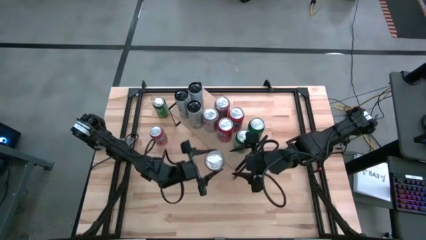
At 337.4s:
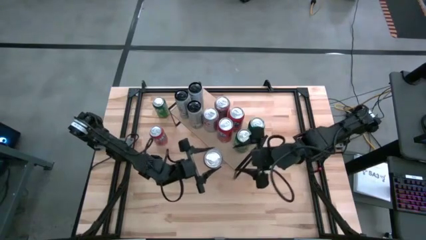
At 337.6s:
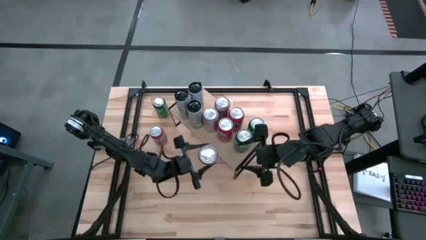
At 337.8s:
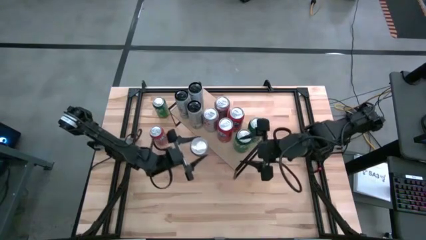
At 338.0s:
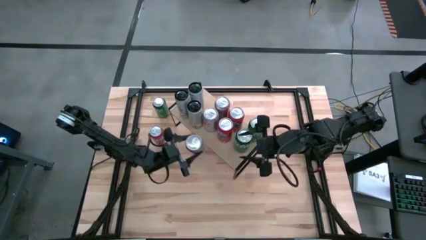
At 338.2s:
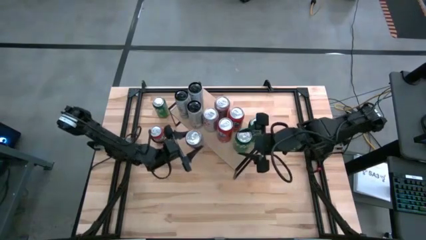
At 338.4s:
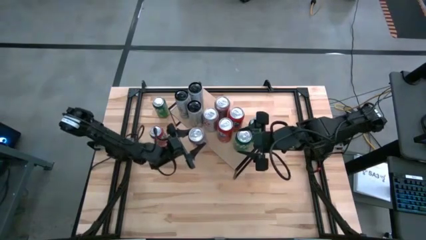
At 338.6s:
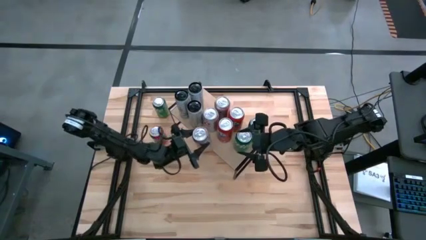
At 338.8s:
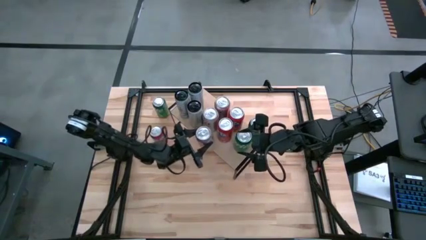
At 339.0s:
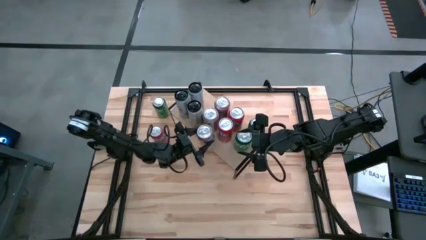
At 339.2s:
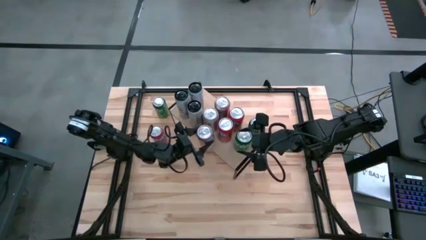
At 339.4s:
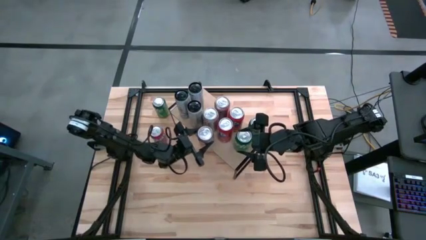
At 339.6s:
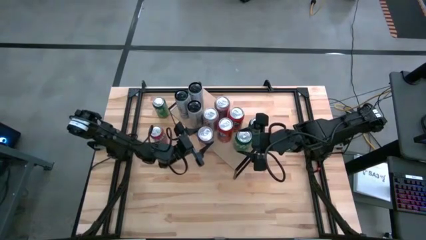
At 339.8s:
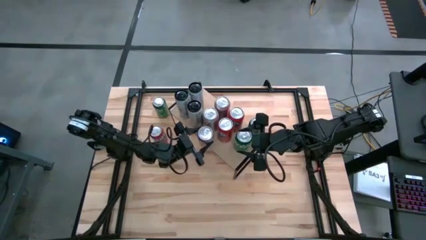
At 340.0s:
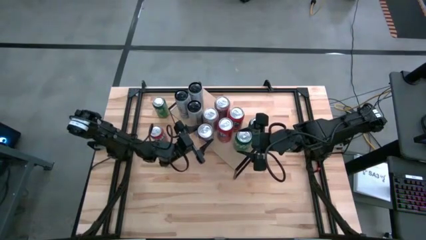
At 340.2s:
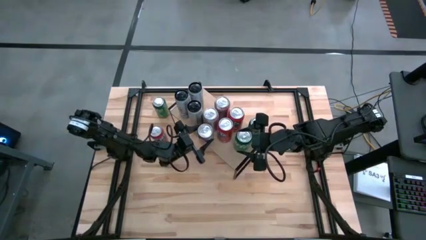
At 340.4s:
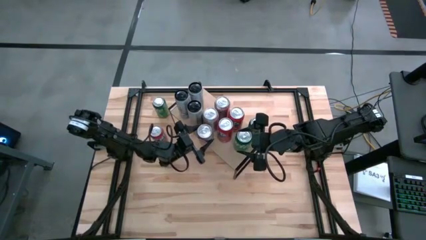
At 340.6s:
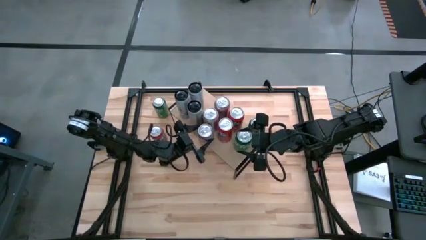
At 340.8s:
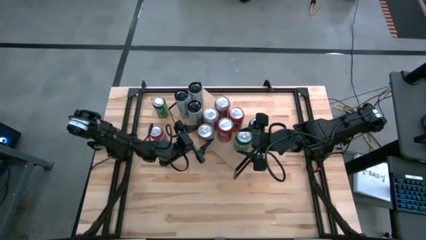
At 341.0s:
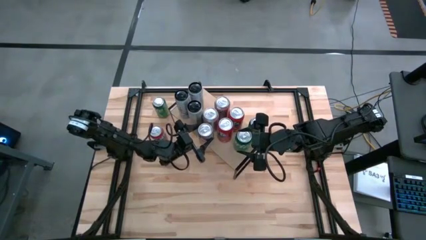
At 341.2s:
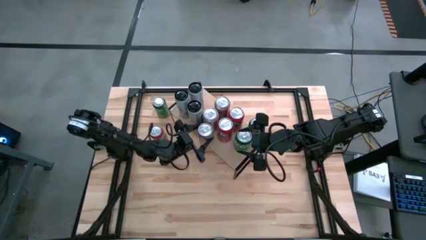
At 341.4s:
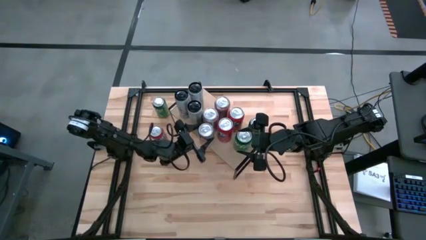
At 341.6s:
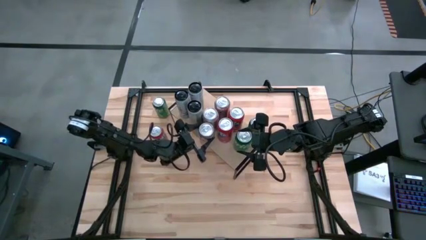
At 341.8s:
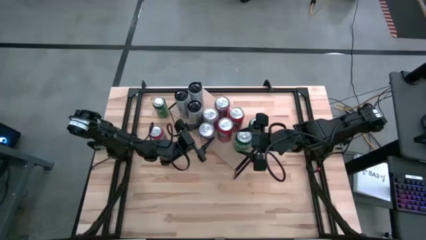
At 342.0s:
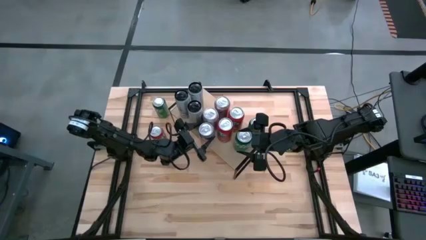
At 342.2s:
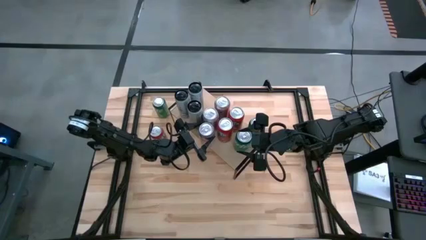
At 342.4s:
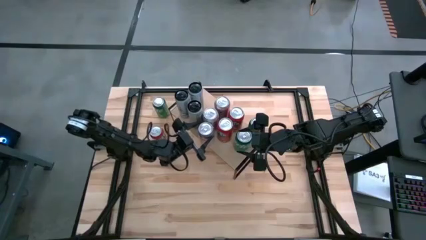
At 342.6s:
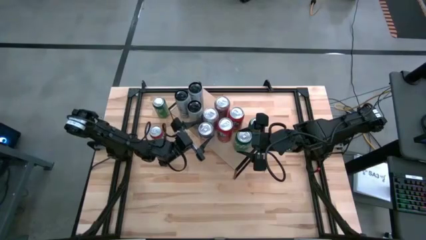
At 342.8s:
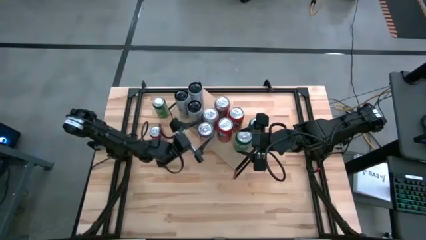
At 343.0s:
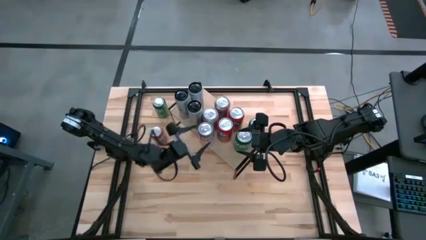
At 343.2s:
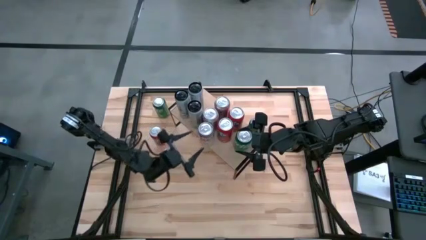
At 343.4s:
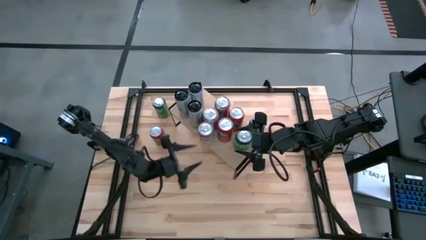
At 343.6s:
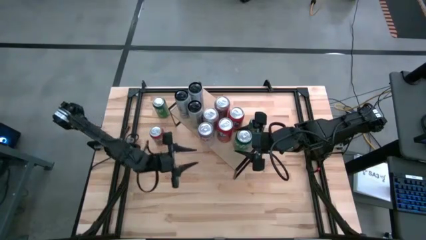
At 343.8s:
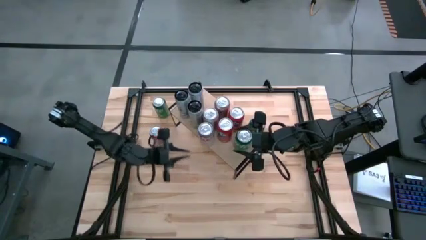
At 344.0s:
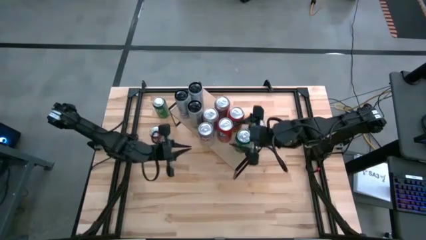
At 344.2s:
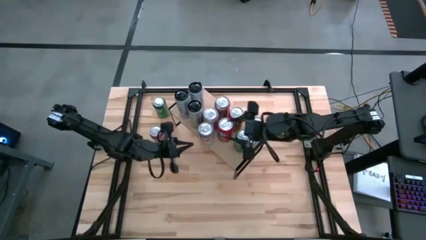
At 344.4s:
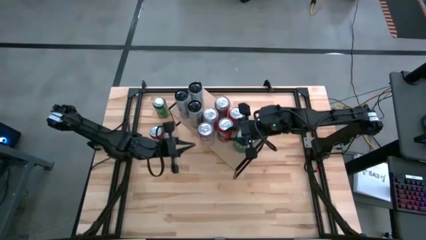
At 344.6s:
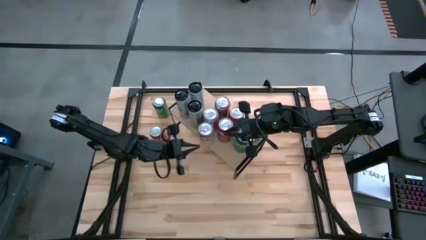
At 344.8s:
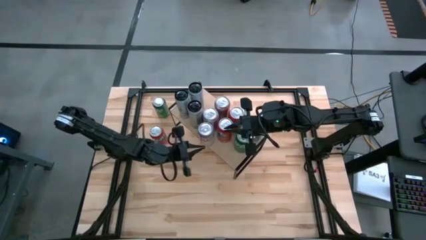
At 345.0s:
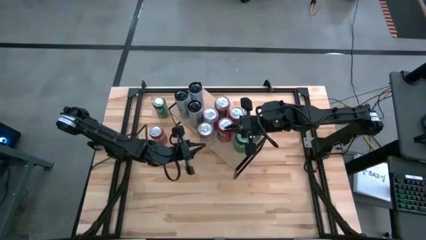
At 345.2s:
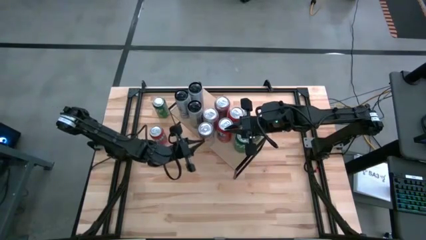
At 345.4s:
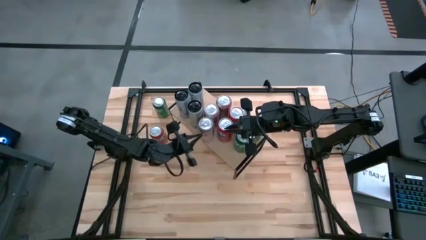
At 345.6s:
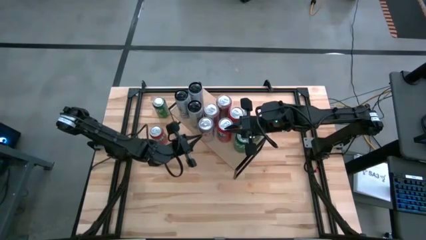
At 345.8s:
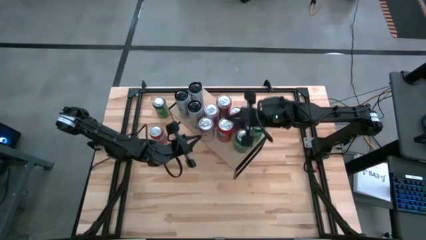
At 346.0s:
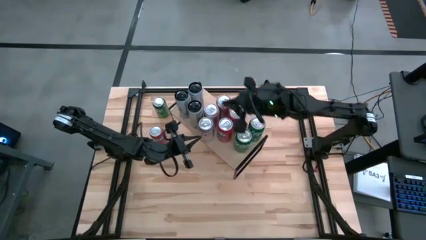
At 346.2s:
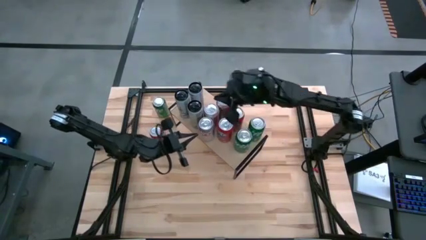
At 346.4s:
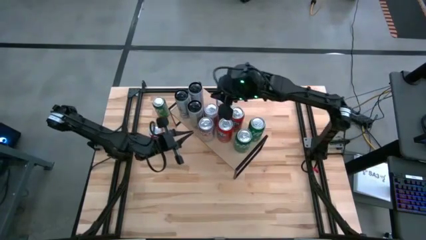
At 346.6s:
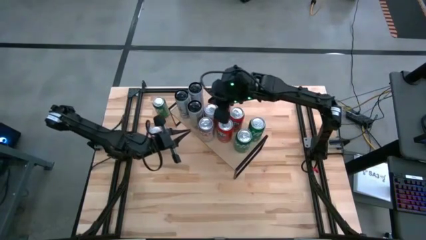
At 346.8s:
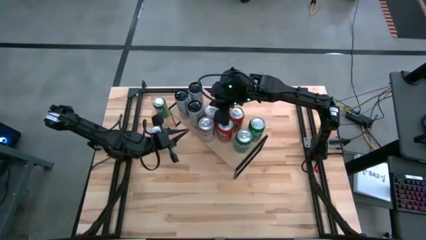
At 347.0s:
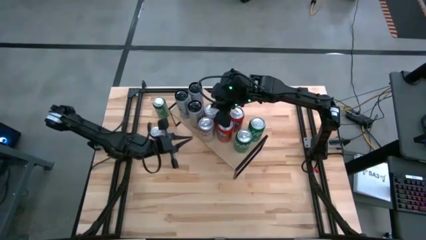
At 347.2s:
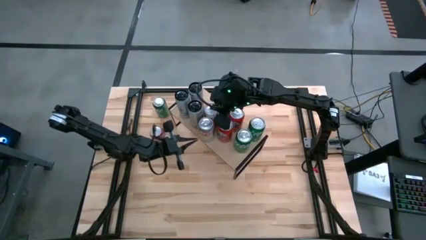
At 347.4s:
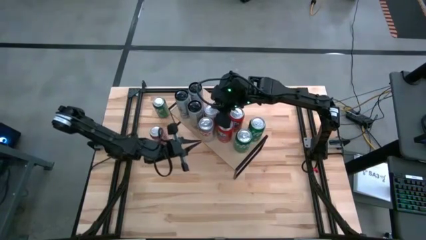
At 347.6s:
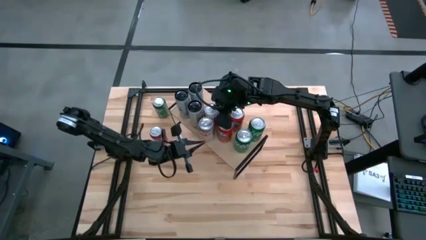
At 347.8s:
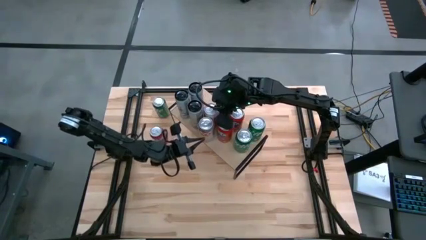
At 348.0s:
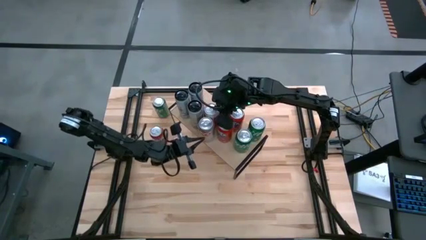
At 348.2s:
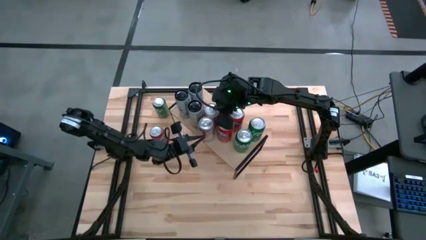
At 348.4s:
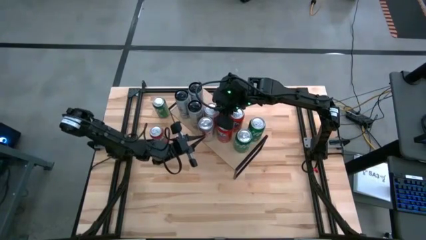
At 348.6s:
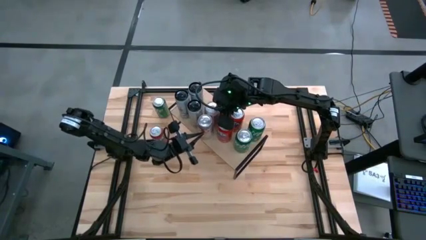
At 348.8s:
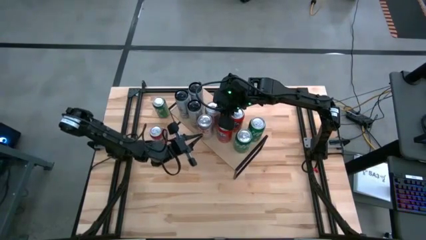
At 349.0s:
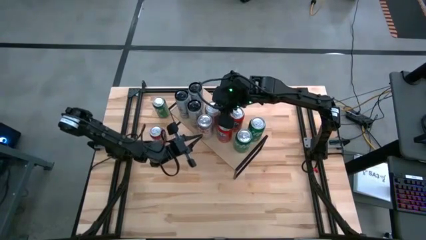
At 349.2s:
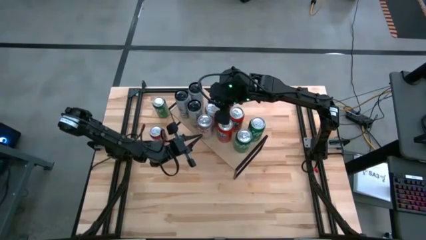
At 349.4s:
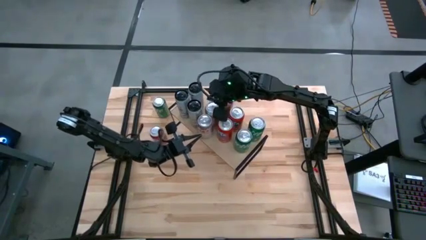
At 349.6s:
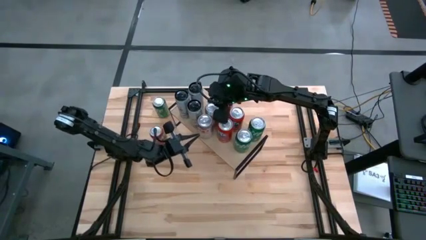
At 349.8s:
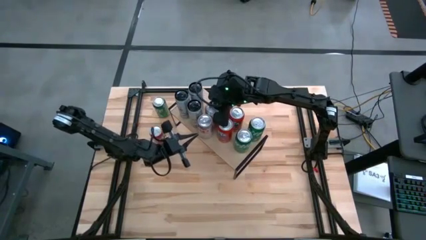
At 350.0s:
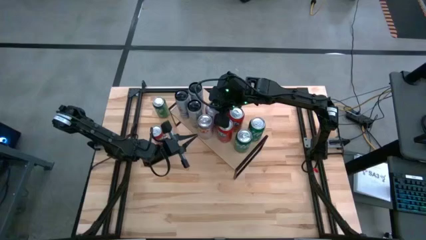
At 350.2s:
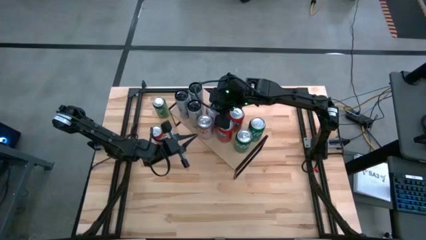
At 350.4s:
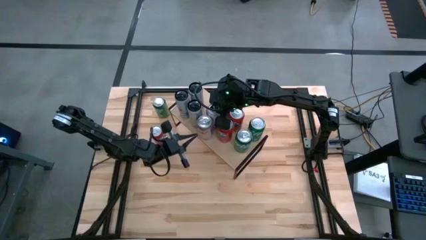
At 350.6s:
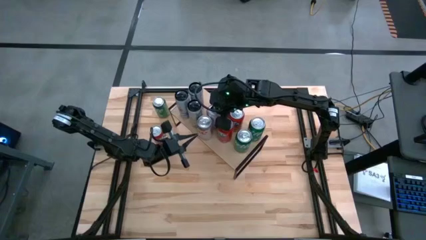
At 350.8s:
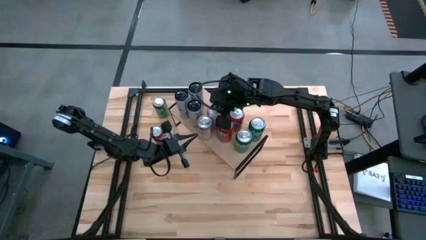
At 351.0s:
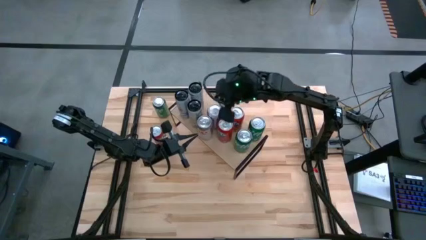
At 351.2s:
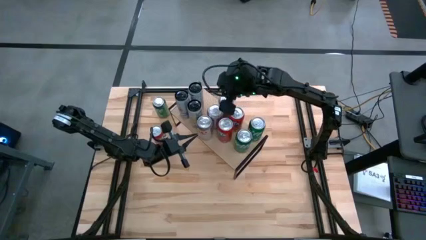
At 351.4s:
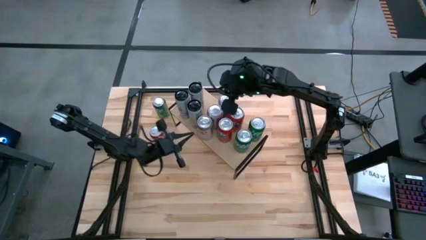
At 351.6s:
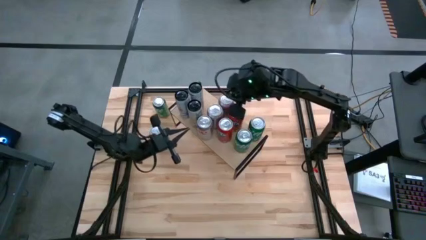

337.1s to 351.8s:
Task: Place canned beverage on shelf
Put the silver soda can on the shelf aligned with the other silver soda can

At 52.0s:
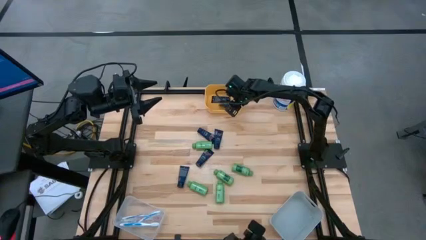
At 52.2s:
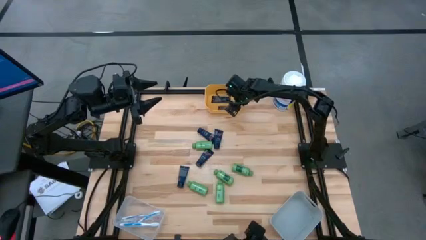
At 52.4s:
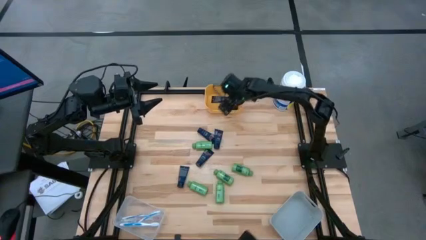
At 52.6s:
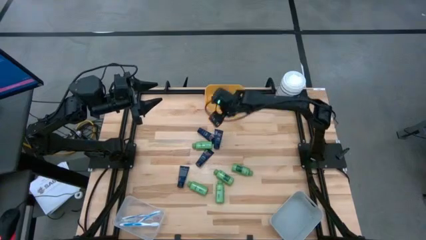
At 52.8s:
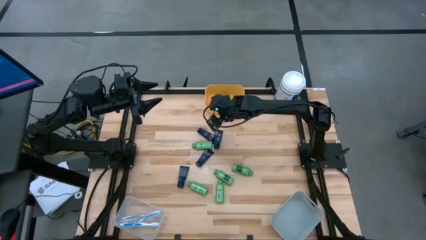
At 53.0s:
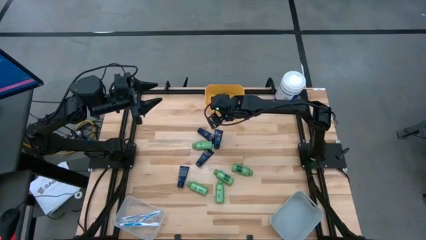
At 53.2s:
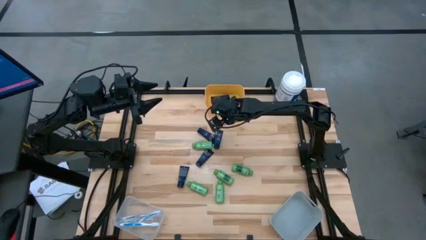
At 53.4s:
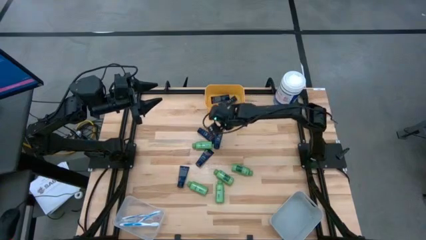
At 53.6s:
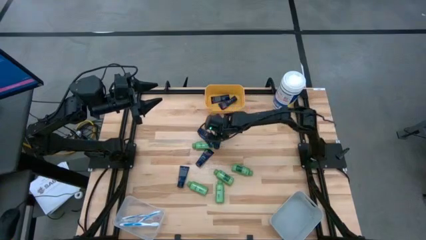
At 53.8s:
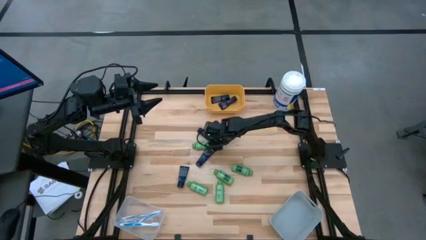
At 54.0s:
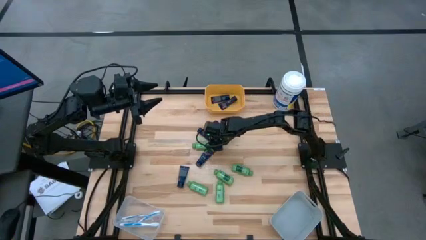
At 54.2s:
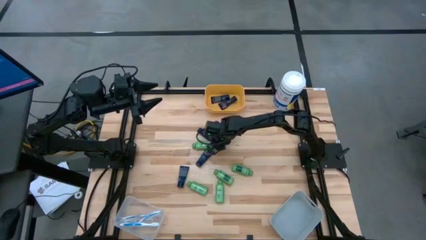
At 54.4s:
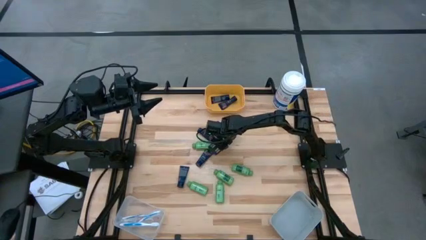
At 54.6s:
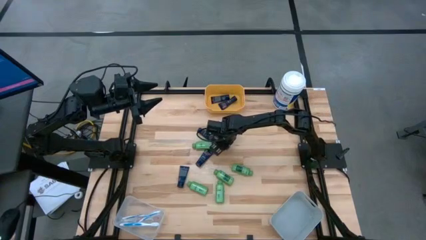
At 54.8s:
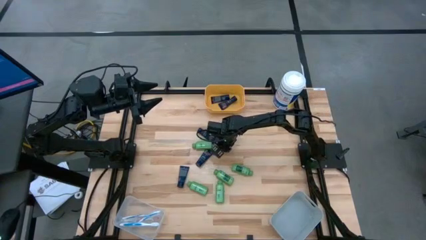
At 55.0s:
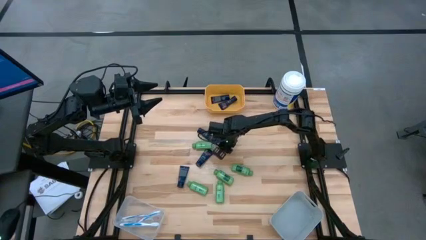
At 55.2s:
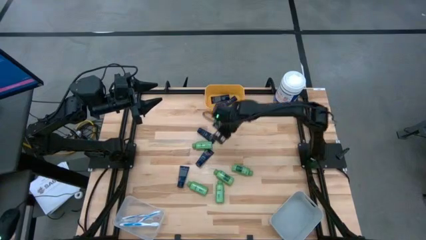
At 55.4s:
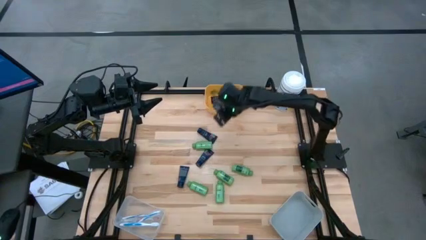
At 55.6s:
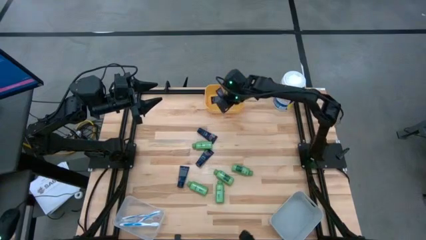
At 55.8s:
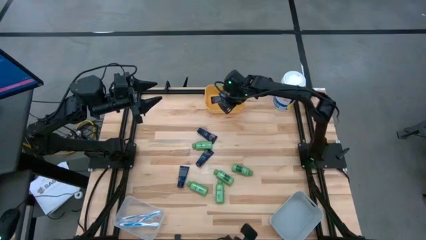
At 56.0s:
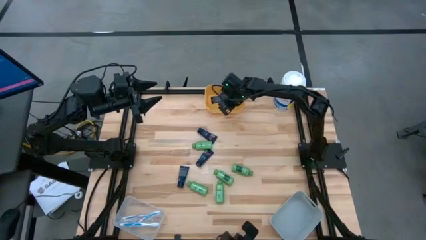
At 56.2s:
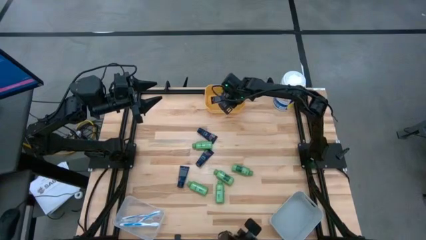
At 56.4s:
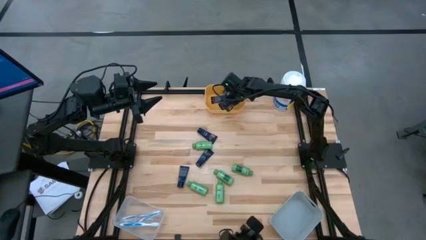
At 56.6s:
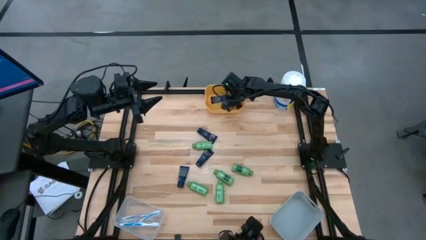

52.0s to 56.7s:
Task: Pick & Place Travel size toiletries
Put the shave cream into the yellow bin
